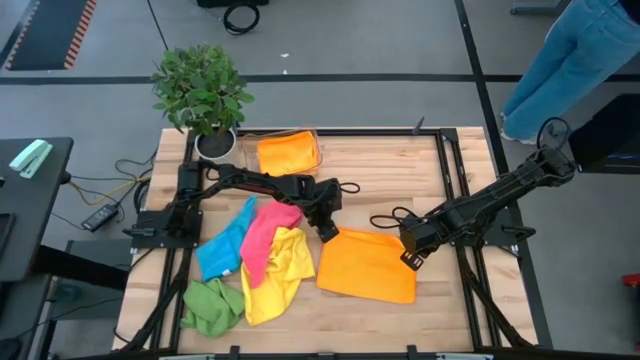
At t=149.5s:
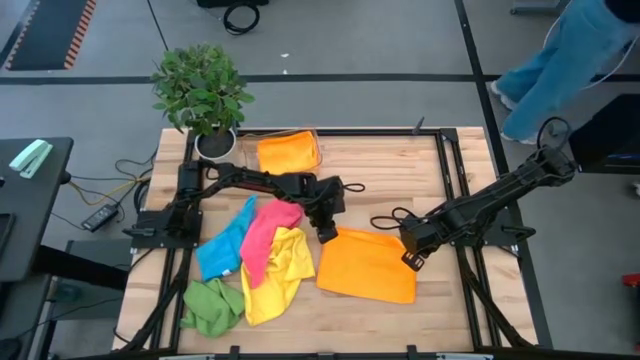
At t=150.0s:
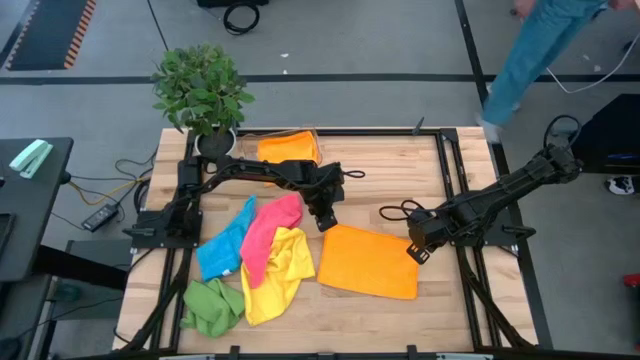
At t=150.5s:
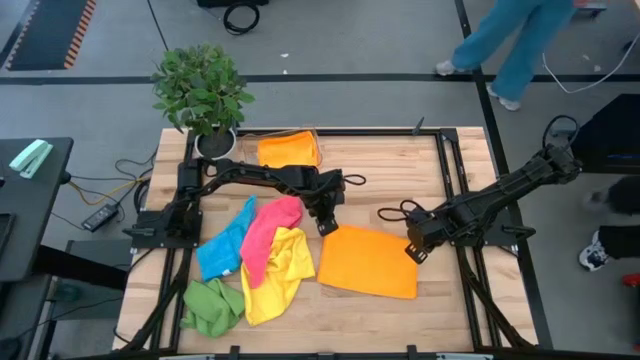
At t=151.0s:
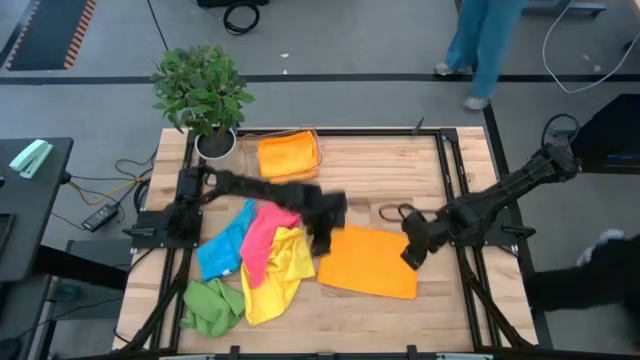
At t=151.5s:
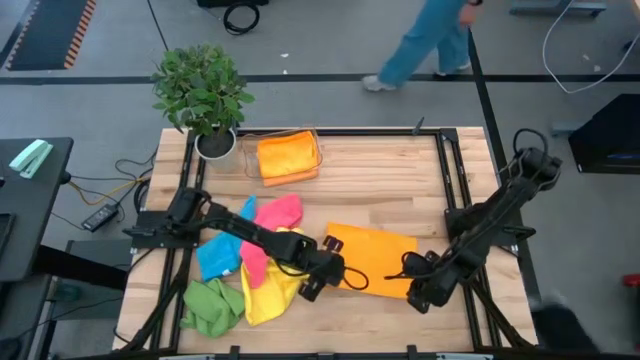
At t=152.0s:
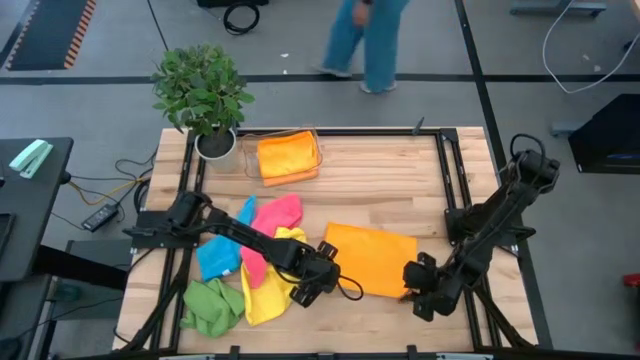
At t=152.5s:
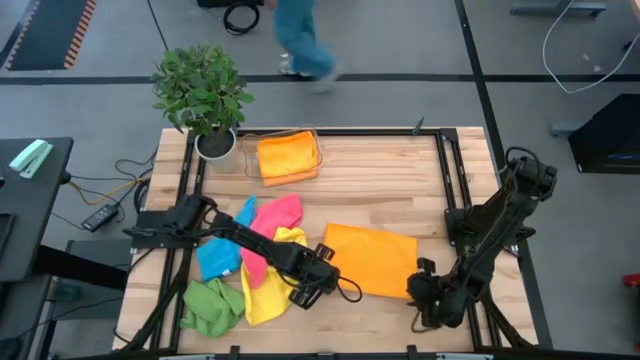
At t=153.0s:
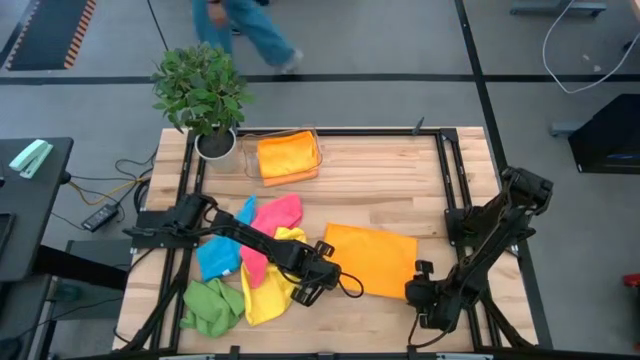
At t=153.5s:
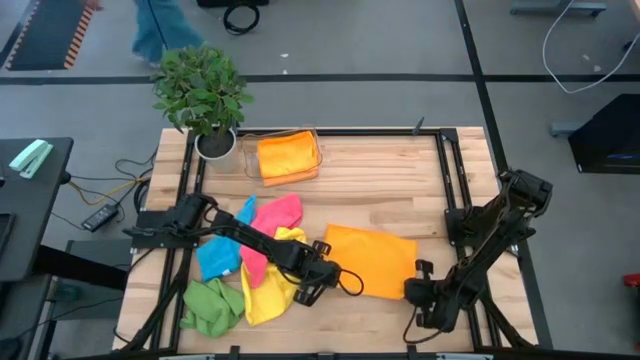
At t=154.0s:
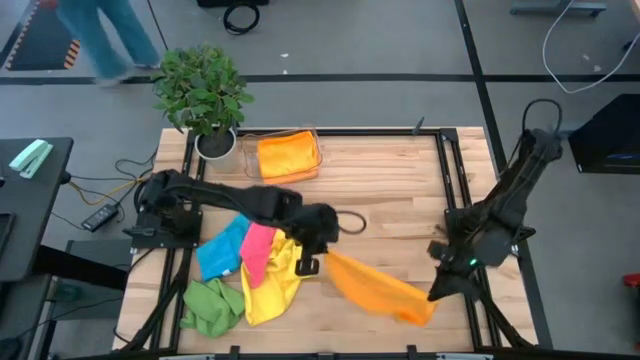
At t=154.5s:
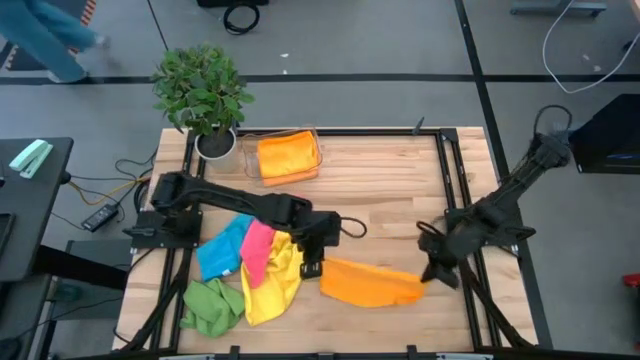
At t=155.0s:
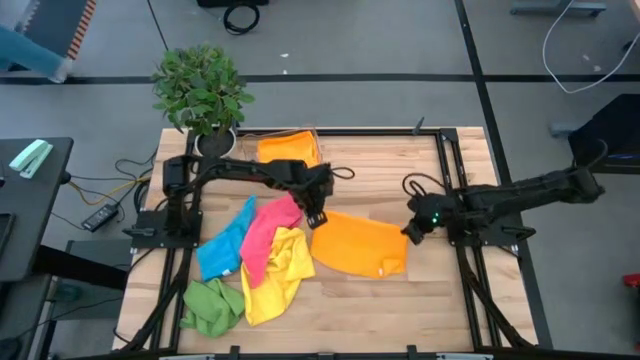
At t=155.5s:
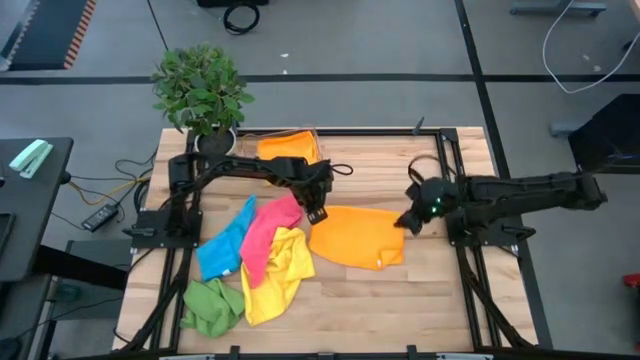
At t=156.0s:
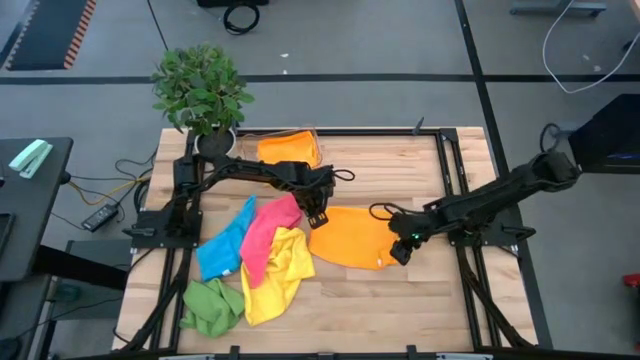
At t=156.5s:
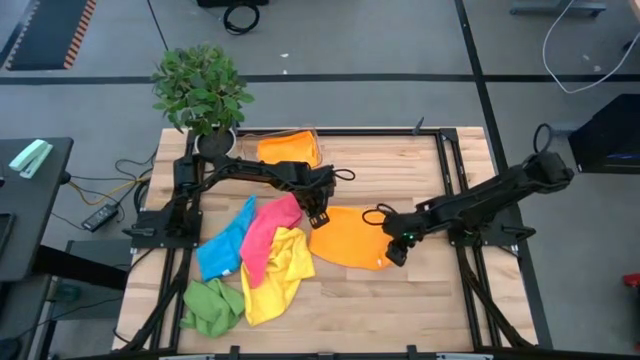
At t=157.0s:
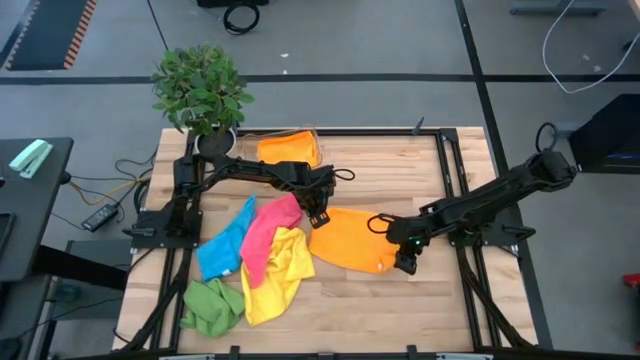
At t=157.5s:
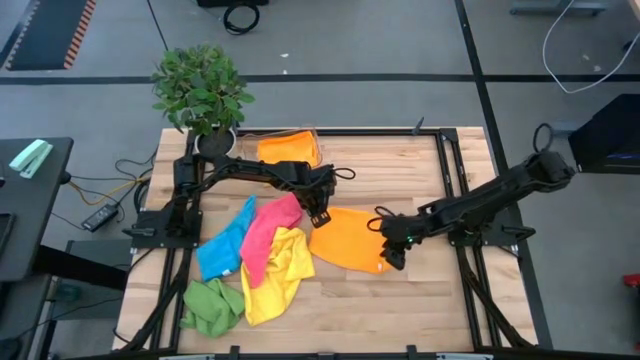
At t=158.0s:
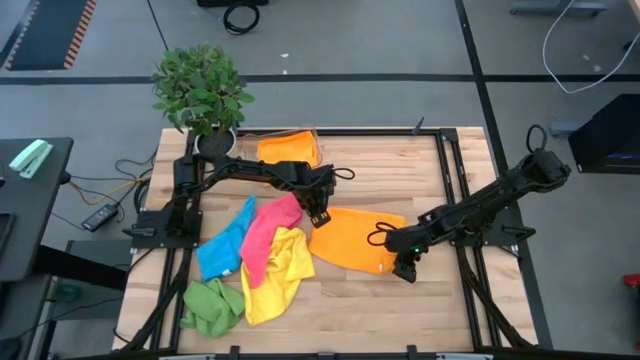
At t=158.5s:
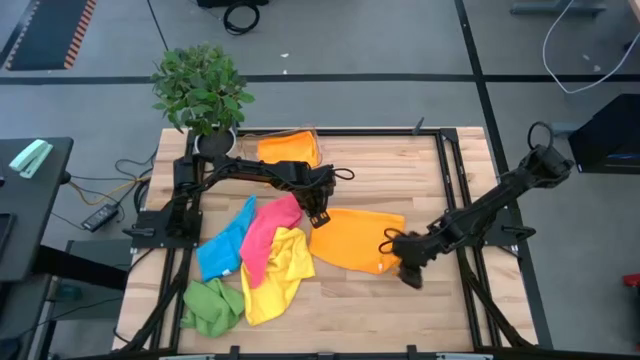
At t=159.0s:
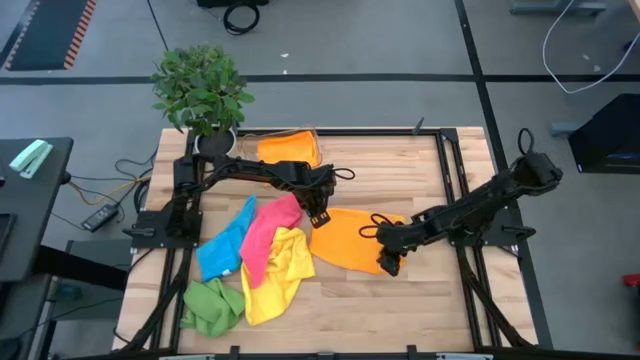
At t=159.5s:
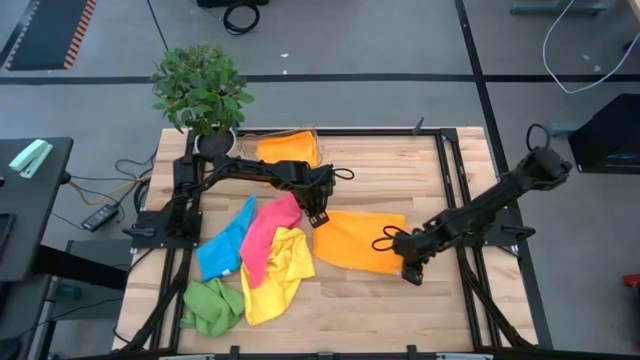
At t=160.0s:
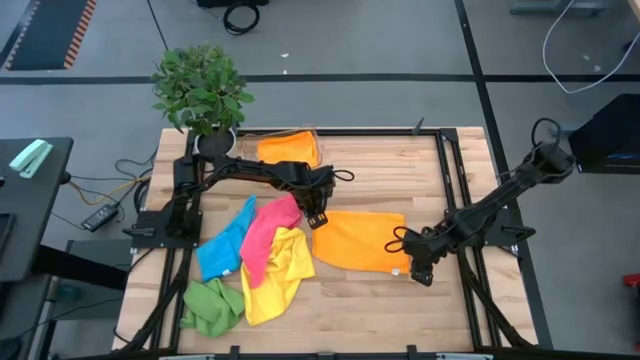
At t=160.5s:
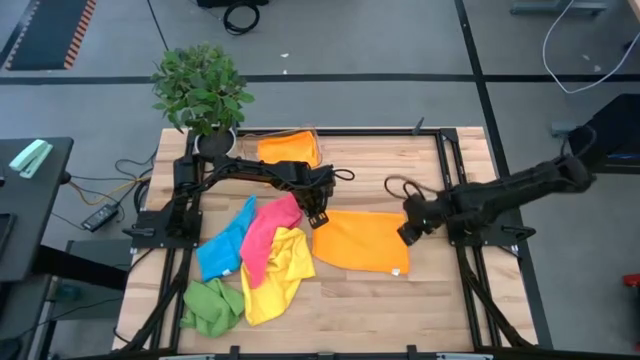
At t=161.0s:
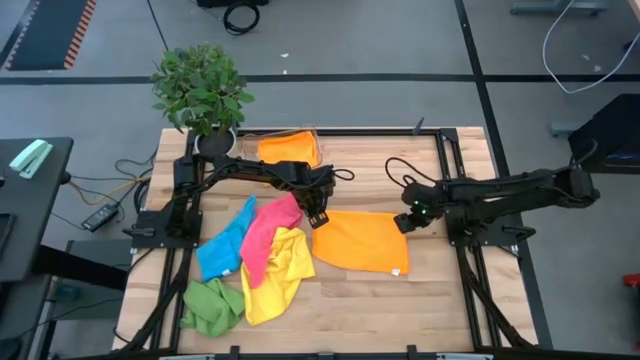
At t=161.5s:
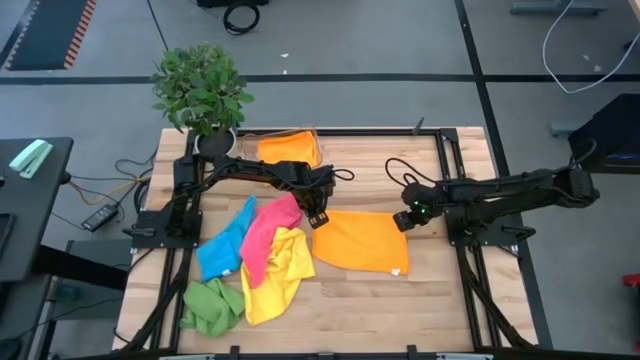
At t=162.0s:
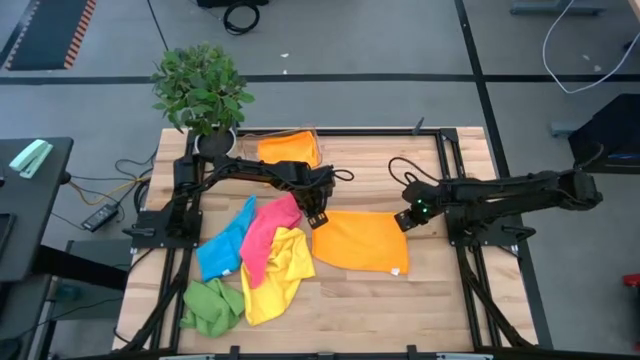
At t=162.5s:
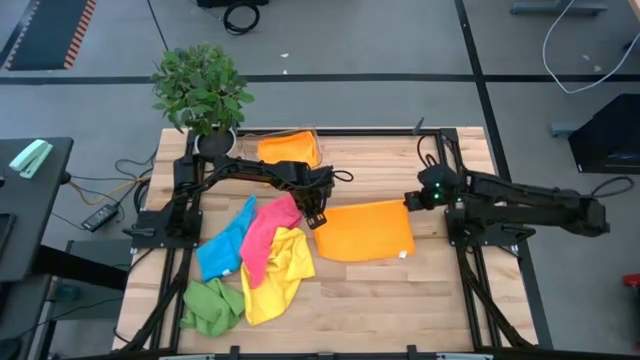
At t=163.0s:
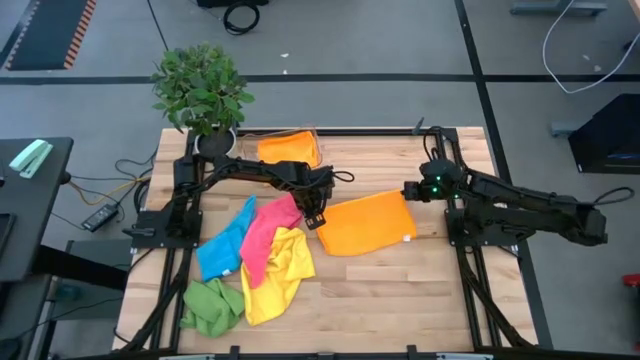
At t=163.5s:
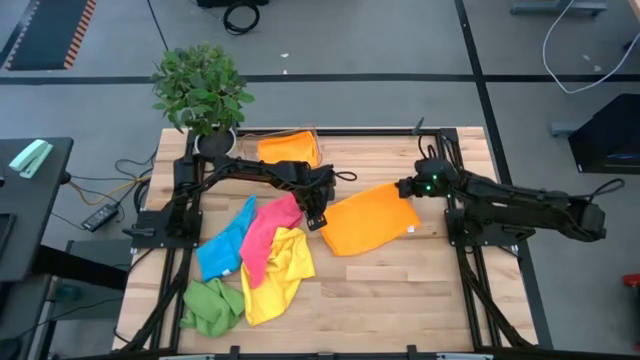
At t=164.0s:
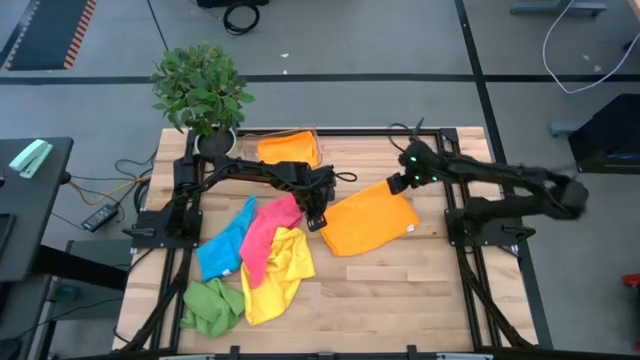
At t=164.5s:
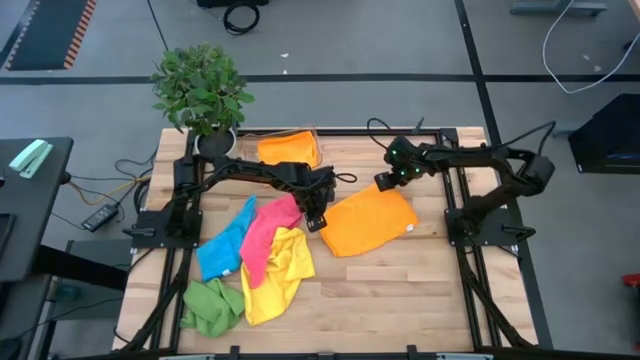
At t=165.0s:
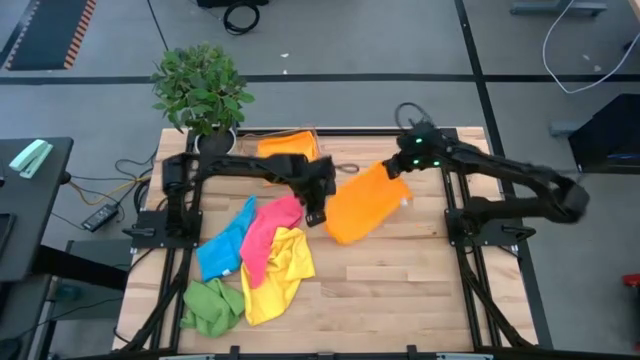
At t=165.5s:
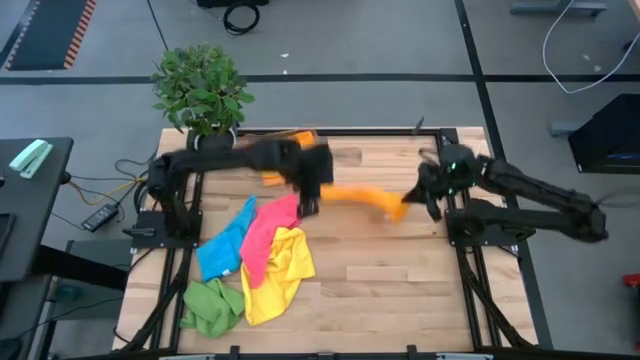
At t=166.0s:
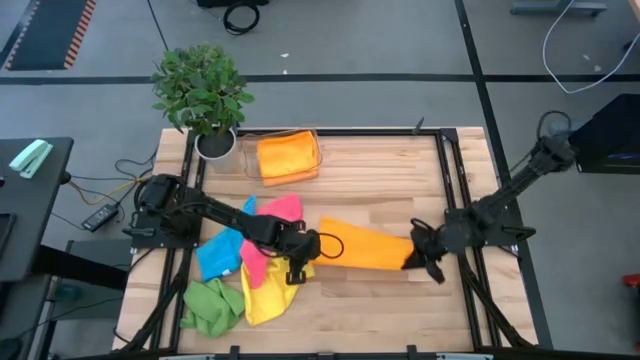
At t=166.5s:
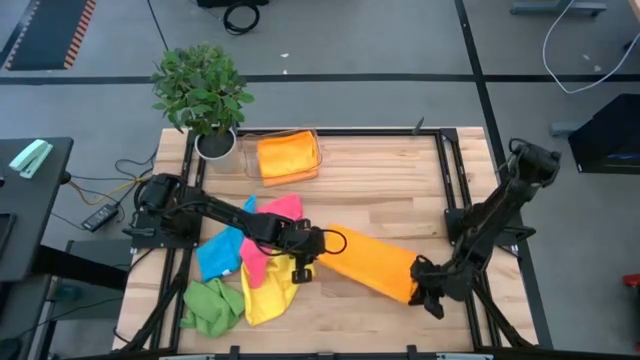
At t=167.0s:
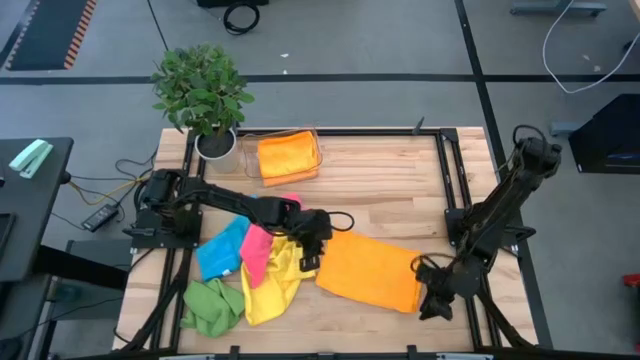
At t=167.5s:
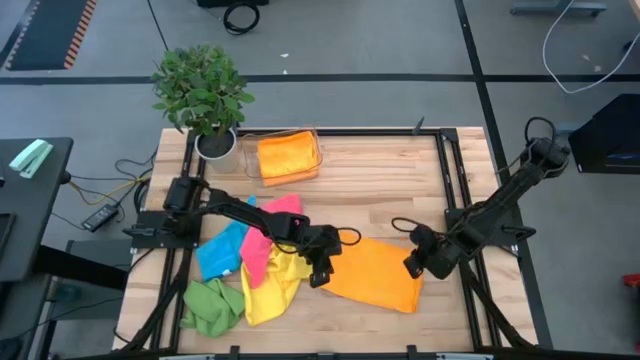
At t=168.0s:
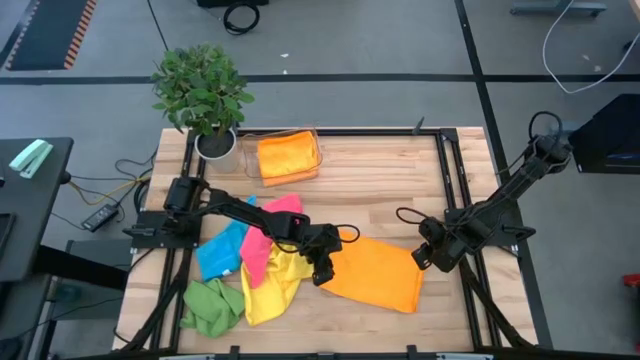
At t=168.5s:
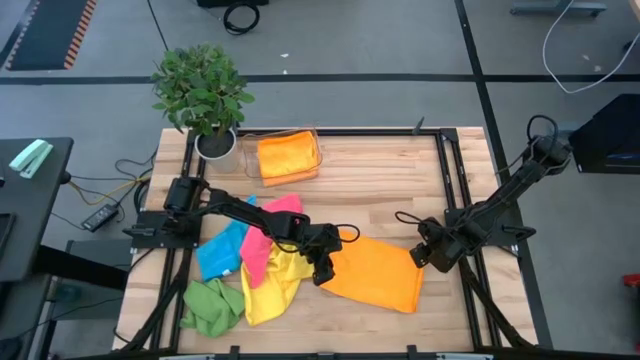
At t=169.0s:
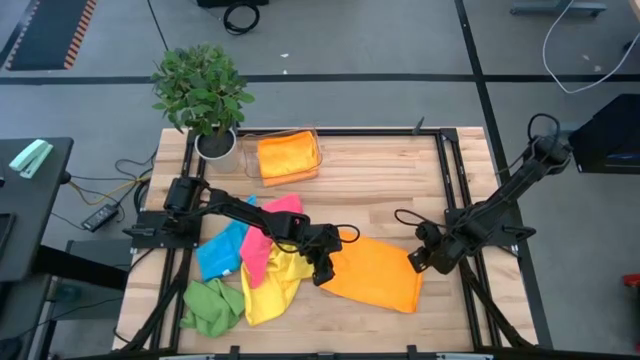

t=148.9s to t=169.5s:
Task: Fold microfiber towels
Fold the orange microfiber cloth

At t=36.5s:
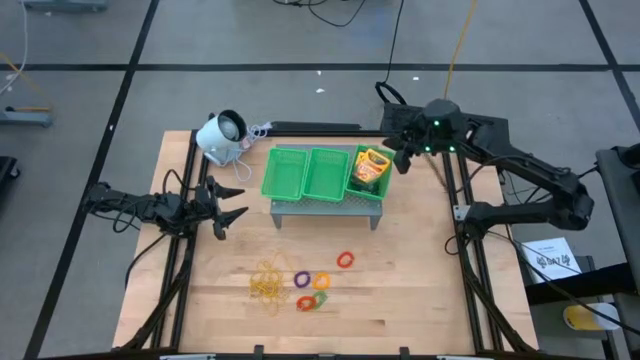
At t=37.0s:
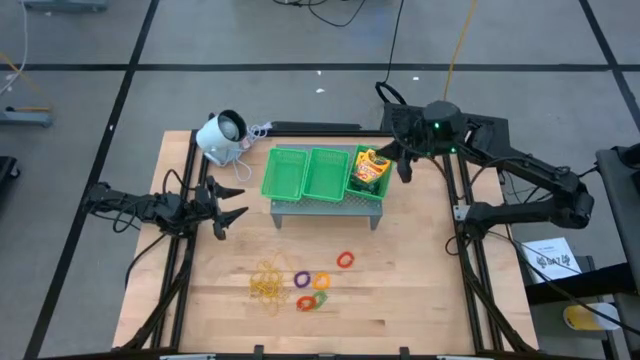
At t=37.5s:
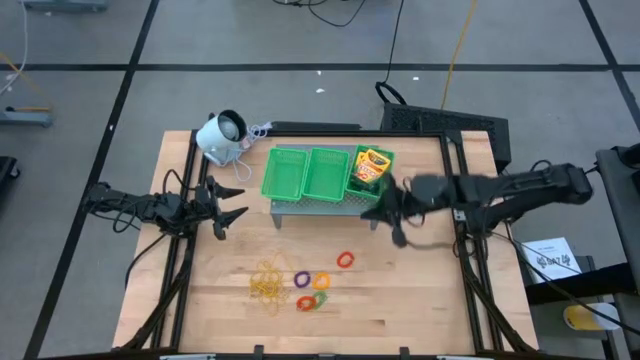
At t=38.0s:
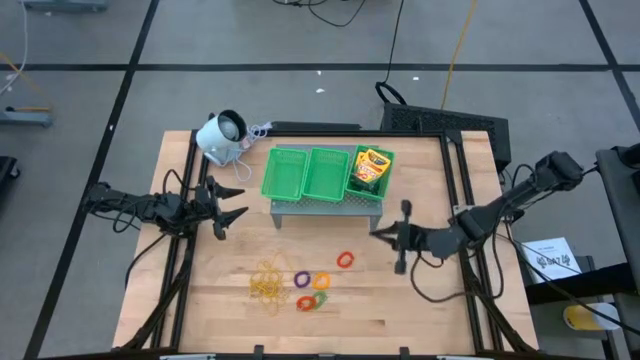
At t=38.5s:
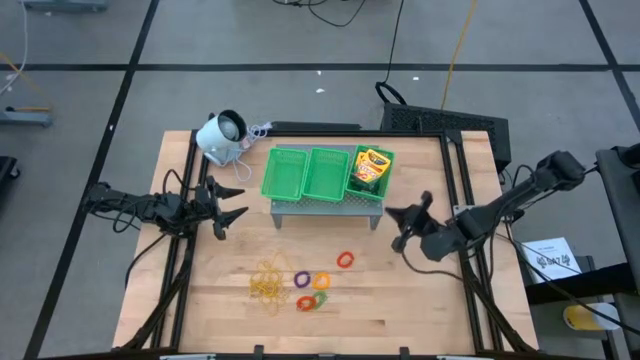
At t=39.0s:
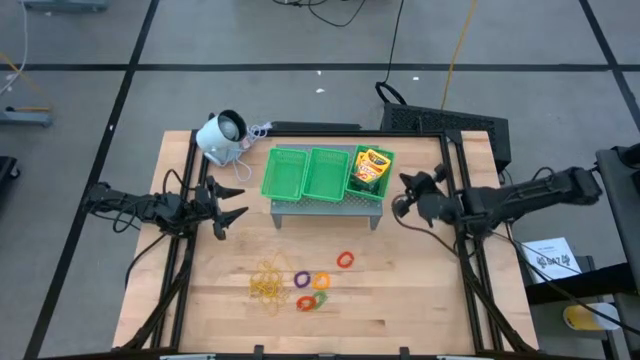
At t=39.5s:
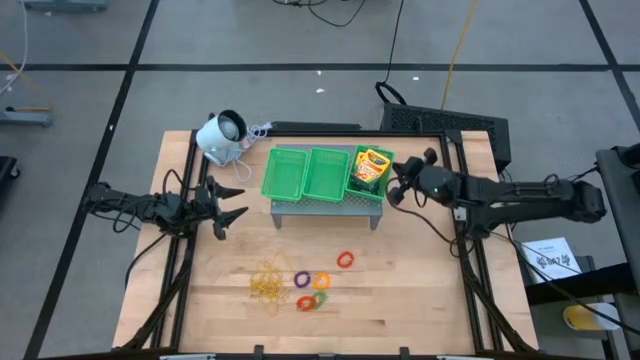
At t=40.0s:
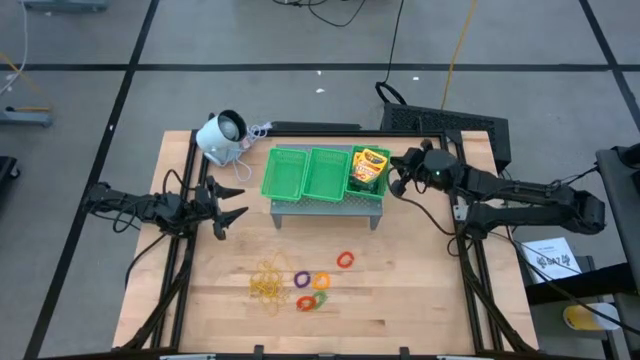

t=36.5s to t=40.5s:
Task: Pick & Place Office Desk Supplies
Adjust the right green basket on the shelf
